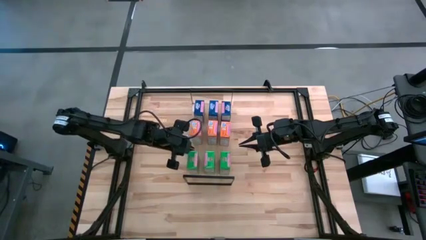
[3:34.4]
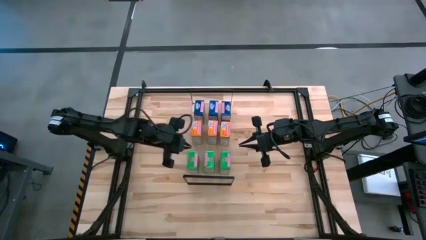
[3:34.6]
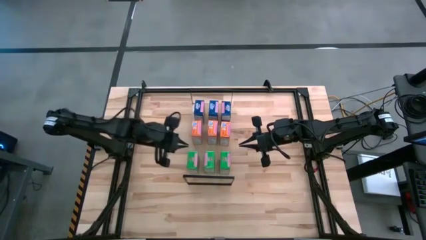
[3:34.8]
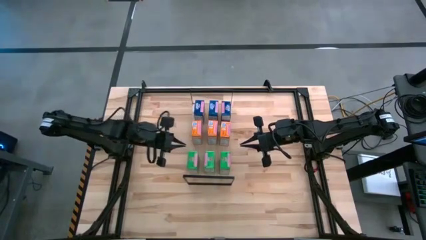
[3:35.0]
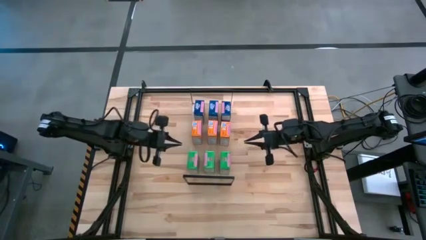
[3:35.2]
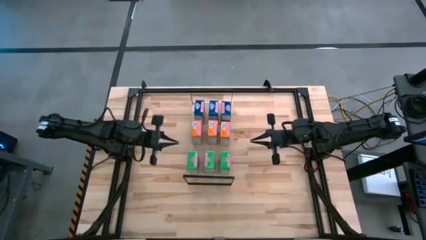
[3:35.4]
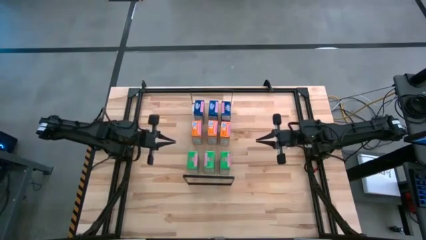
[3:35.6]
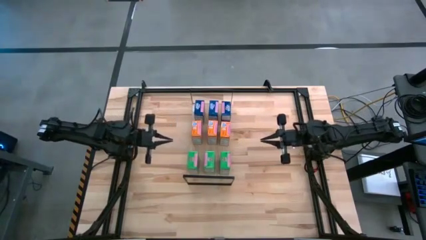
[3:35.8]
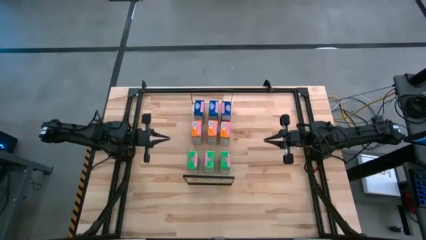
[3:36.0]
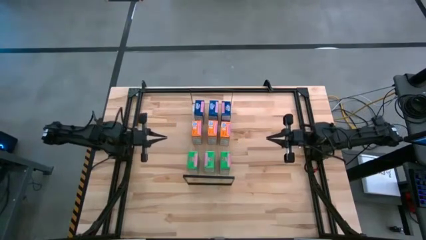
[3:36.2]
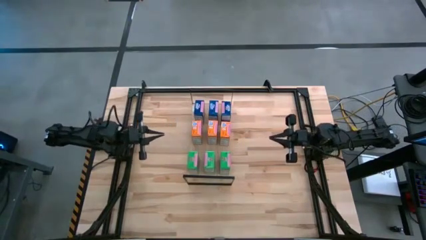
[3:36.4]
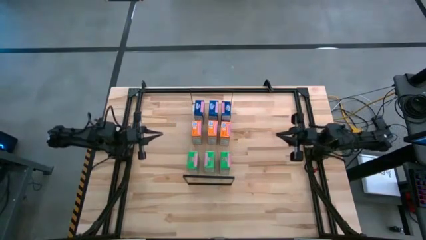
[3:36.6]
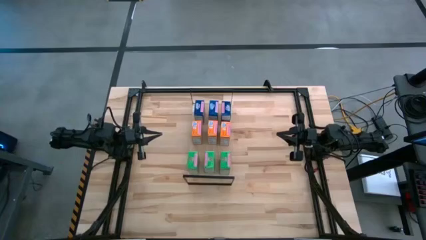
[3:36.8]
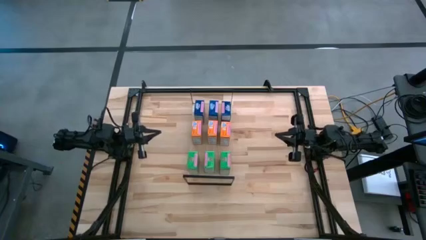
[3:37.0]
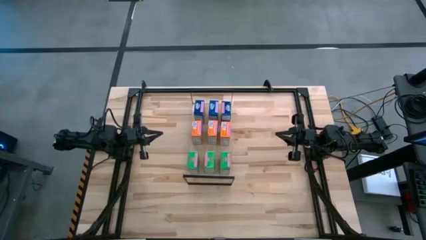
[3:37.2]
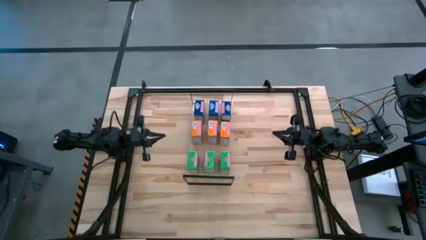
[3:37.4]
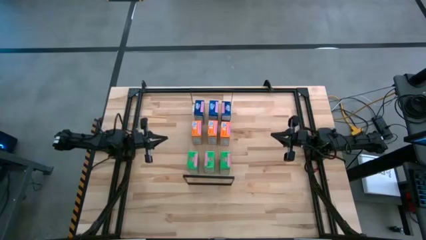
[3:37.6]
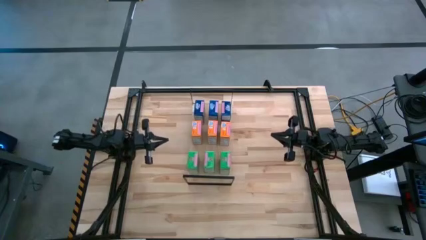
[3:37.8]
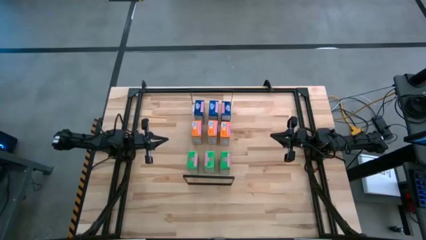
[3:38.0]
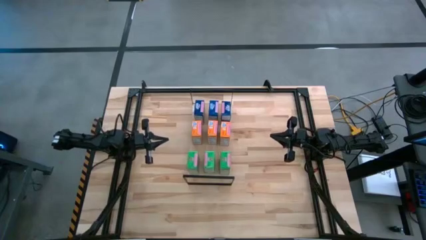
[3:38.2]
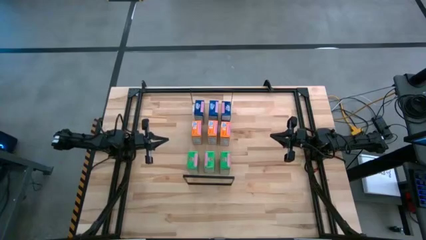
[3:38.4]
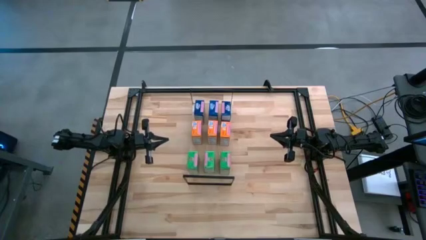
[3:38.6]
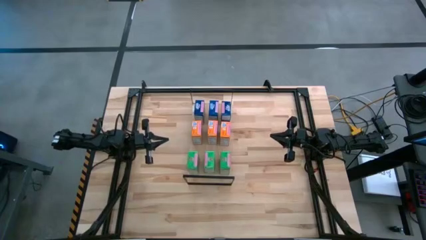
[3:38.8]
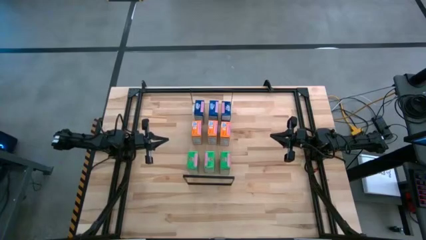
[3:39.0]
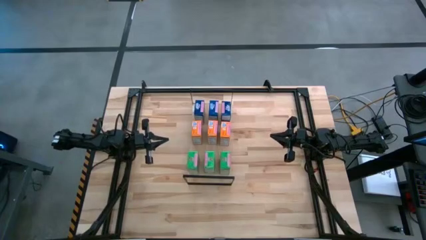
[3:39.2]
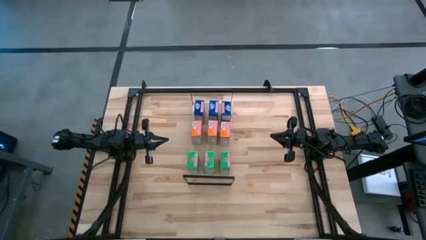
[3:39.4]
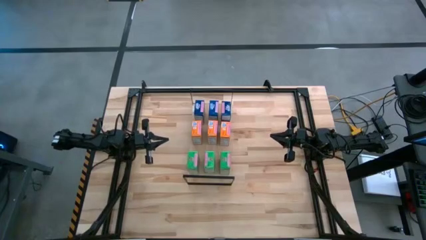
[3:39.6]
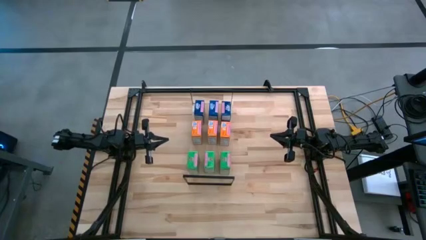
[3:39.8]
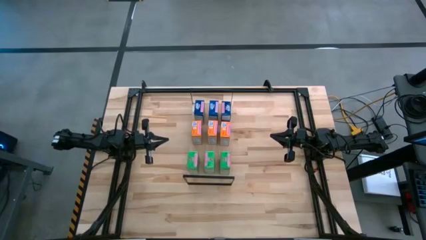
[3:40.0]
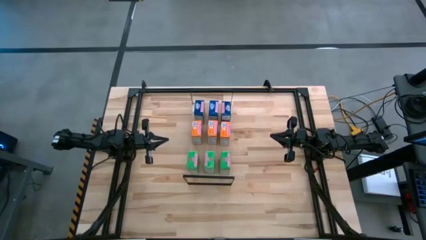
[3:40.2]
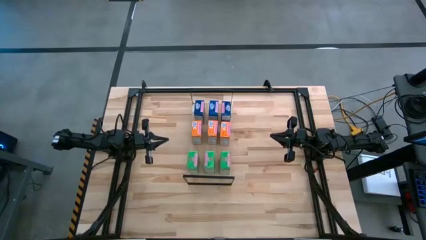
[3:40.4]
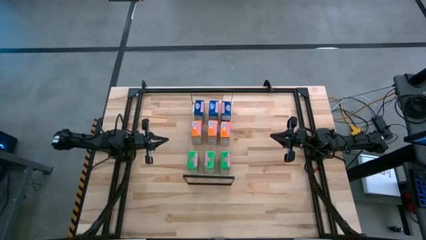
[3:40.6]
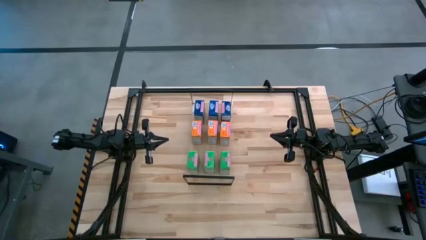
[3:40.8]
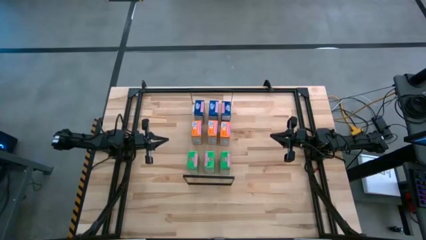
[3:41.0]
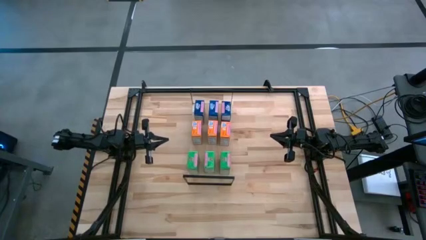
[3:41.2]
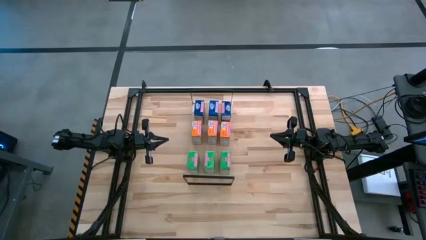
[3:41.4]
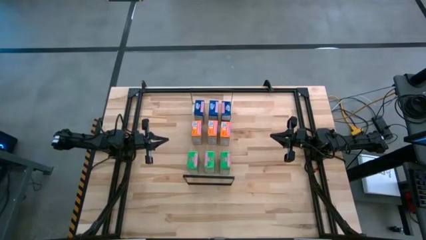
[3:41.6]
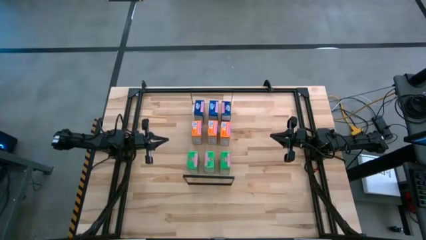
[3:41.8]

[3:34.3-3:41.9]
Task: Stack cereal on shelf
Return to Home Position

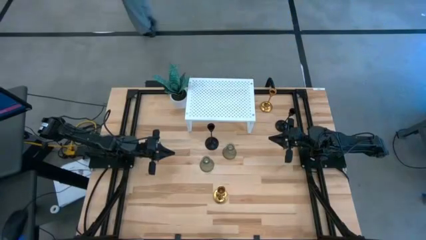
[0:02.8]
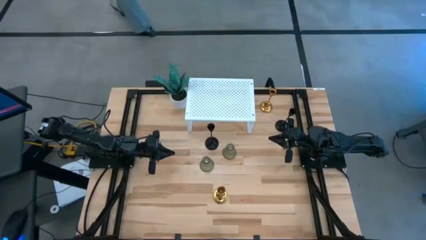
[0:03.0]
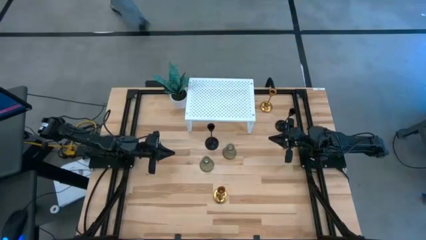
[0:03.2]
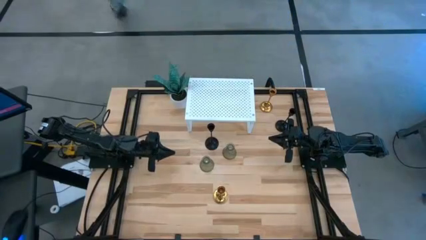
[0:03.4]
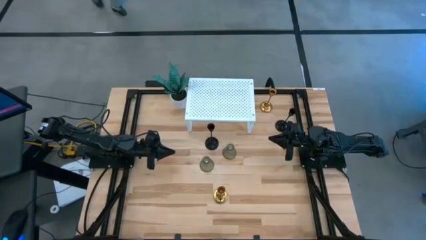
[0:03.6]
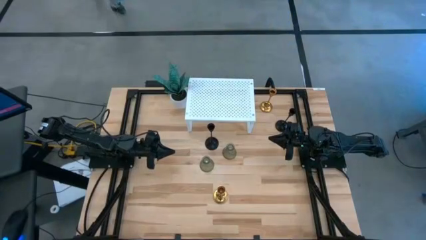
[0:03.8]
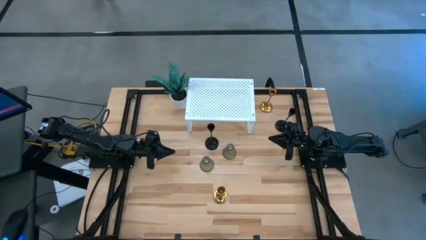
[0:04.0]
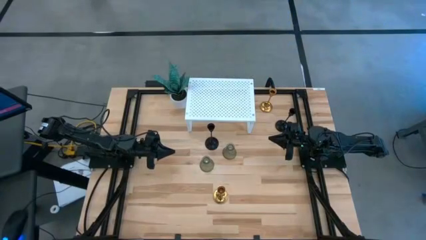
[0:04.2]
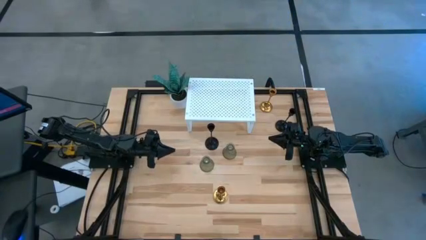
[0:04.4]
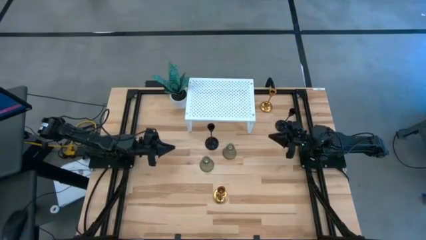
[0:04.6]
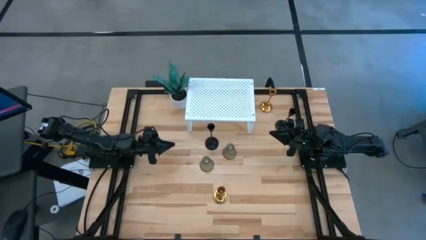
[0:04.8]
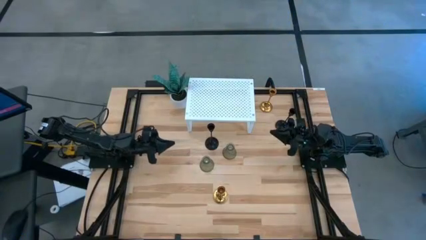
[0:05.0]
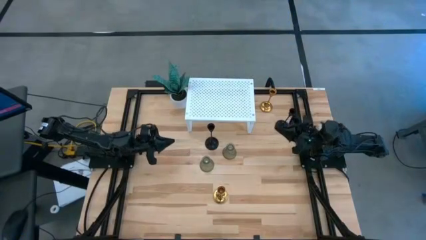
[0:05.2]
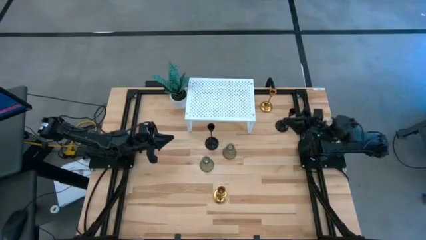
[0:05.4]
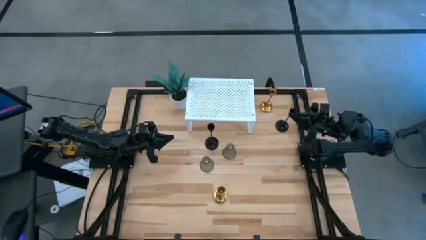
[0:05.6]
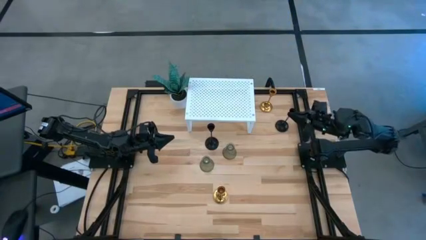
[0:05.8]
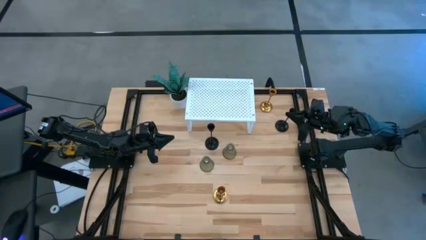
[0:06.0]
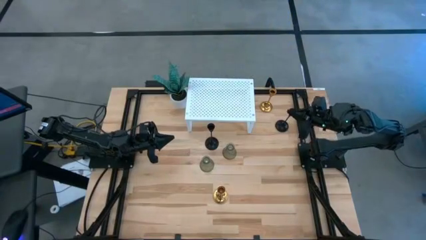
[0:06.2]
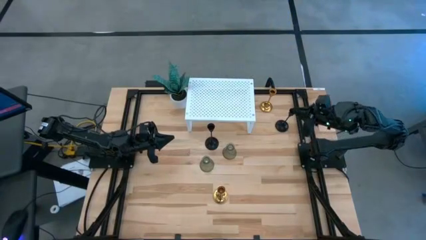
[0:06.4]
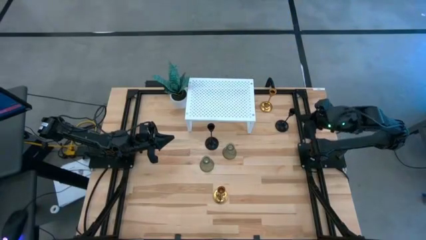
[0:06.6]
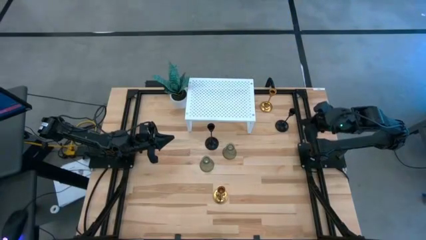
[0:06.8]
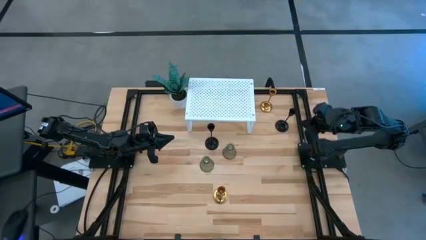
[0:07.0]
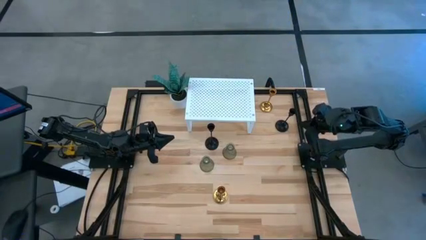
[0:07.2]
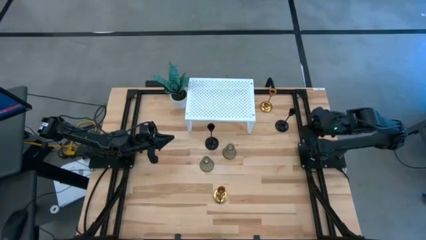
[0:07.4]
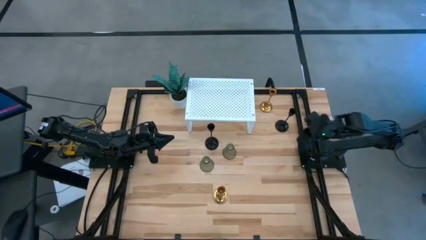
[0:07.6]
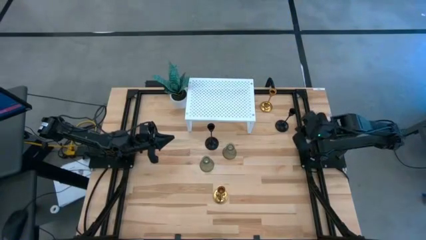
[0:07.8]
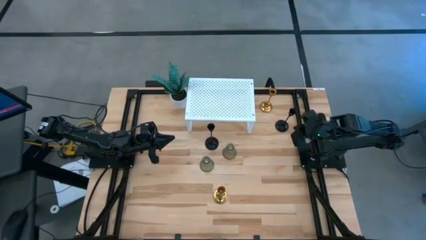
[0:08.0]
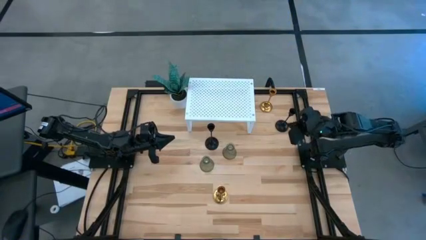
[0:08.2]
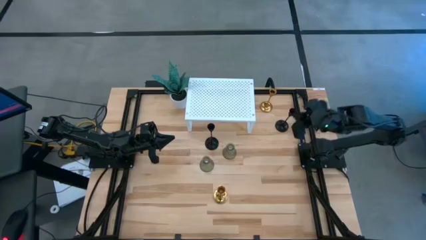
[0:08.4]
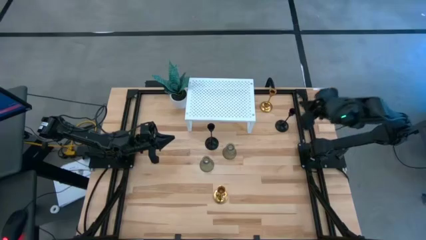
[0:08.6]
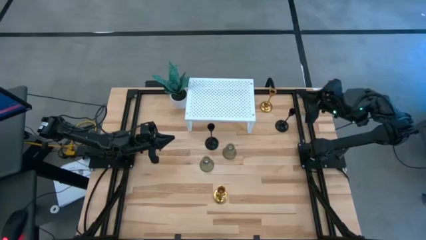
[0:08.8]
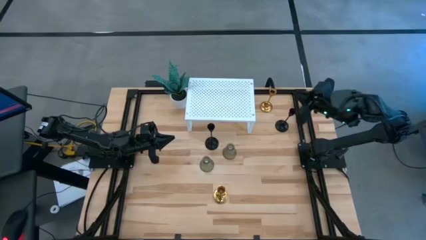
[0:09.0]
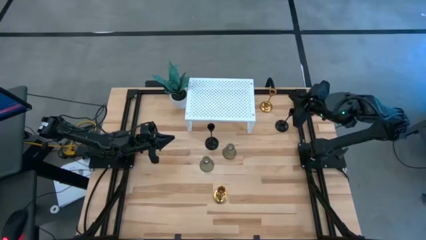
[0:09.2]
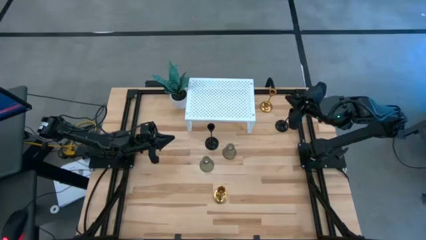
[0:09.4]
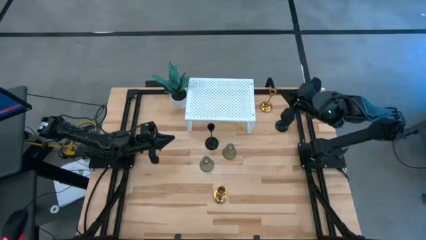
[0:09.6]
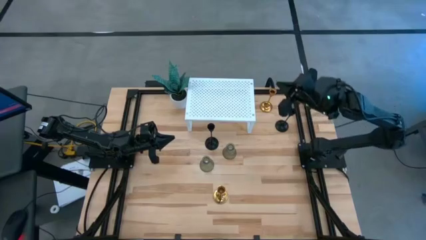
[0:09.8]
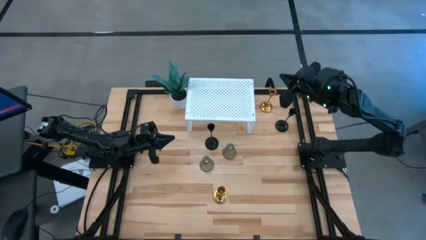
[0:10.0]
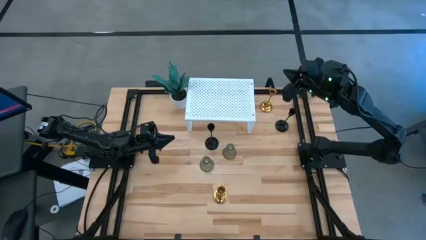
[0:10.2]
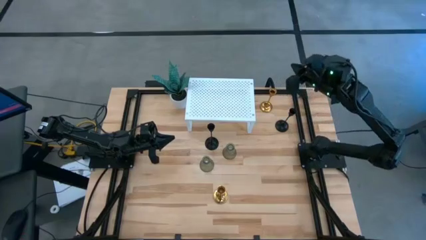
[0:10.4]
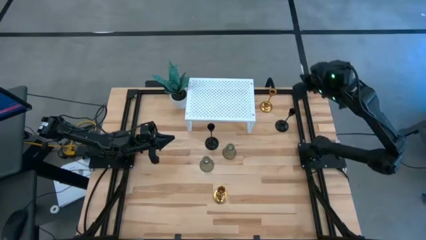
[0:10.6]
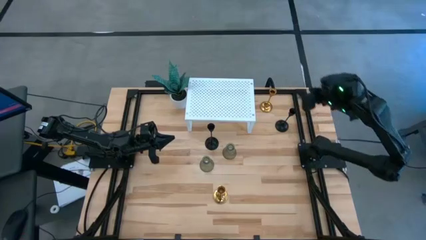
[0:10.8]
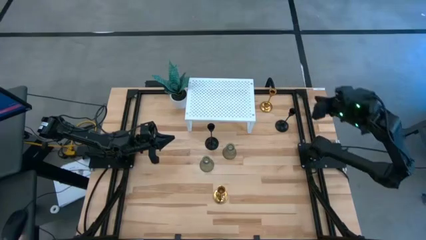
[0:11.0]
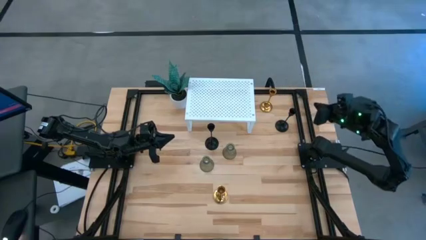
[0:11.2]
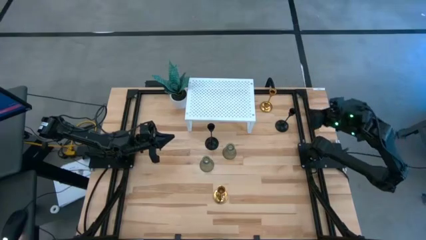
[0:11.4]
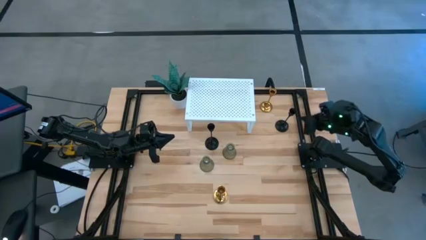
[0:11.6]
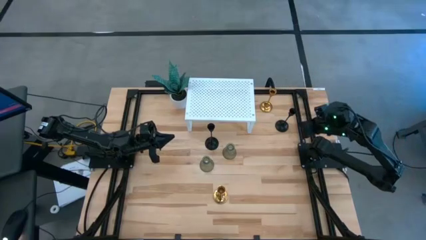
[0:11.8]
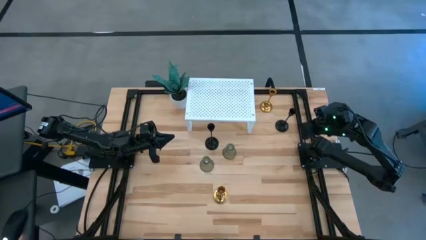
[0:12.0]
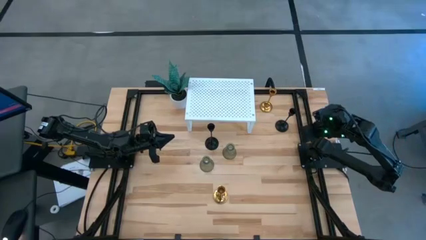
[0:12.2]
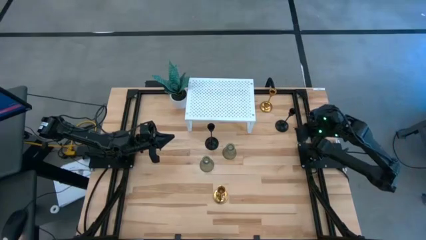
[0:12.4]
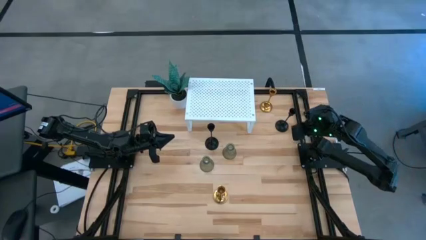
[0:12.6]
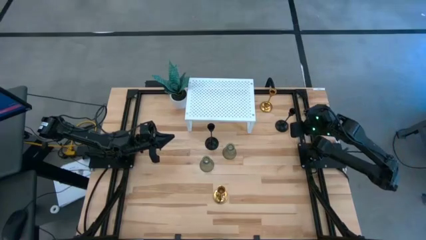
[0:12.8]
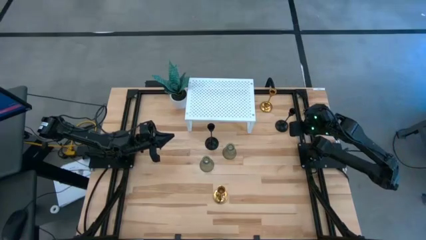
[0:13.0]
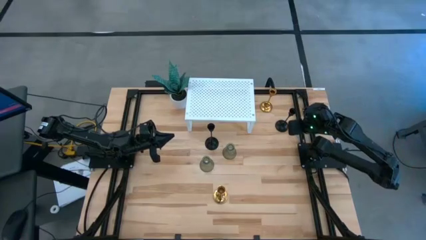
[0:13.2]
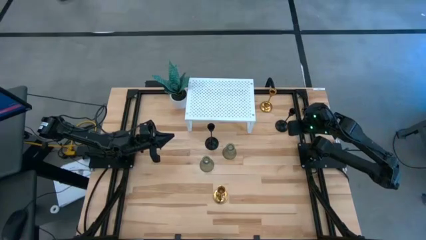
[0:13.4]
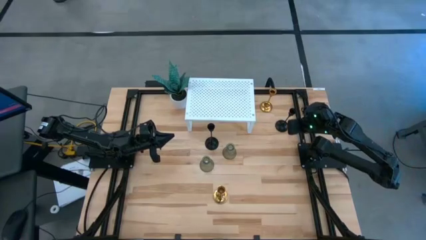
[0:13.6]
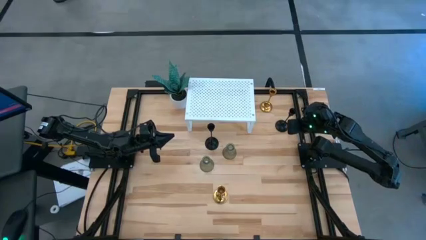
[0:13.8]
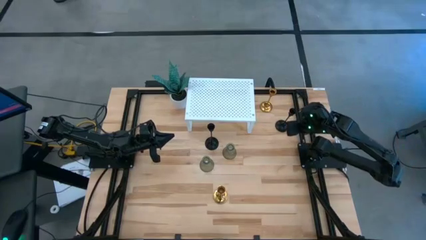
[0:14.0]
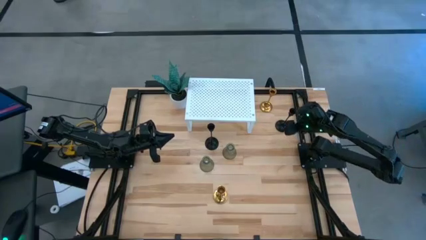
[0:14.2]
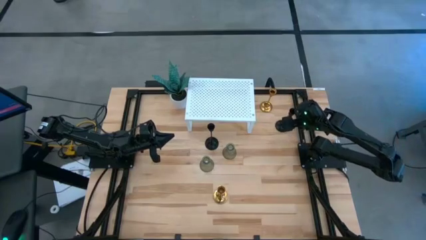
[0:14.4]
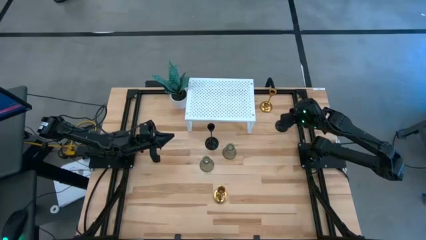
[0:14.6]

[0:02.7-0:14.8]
Task: Pick & Place candle stick holders
Put the right black candle holder on the shelf
